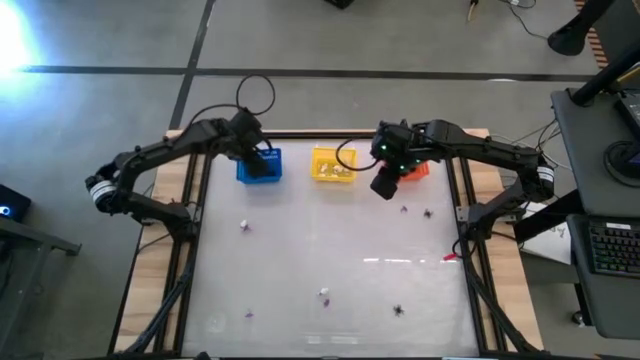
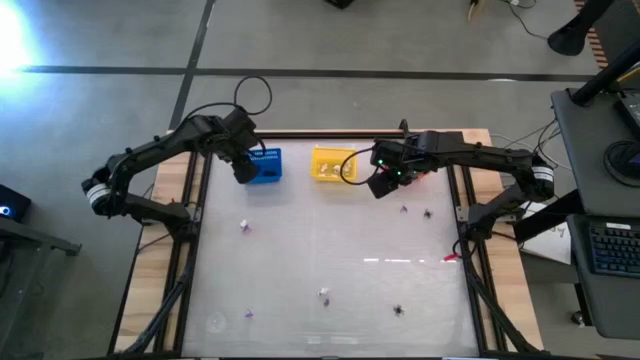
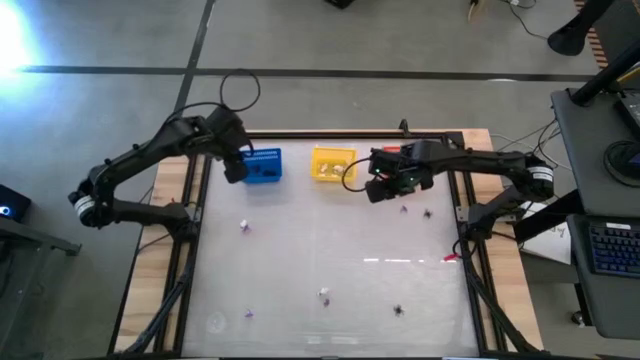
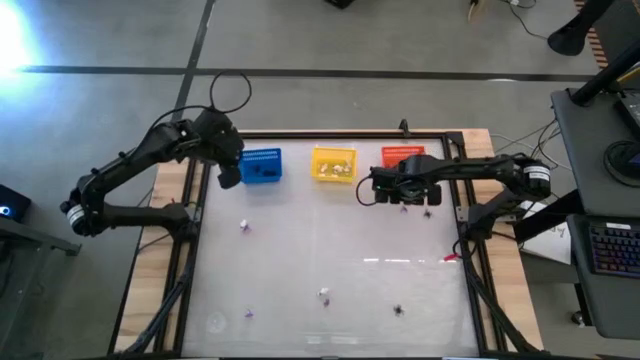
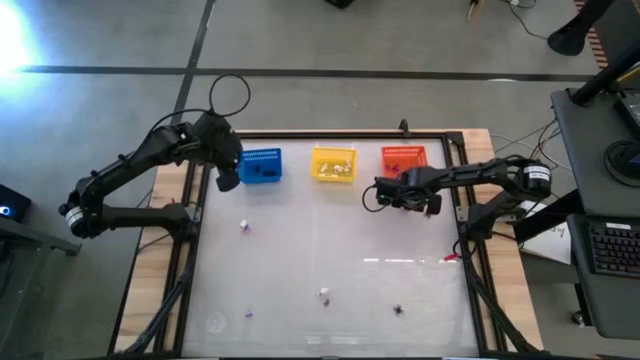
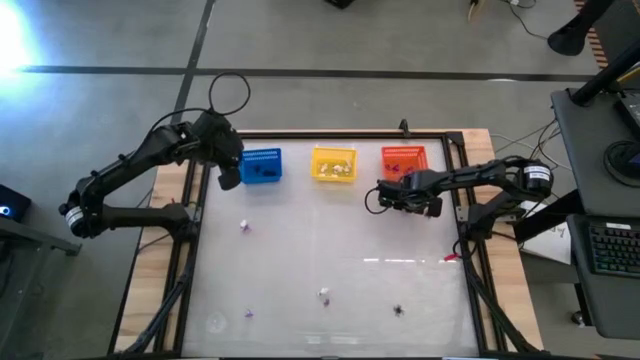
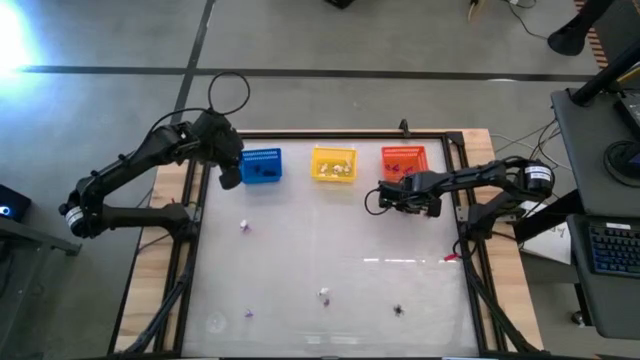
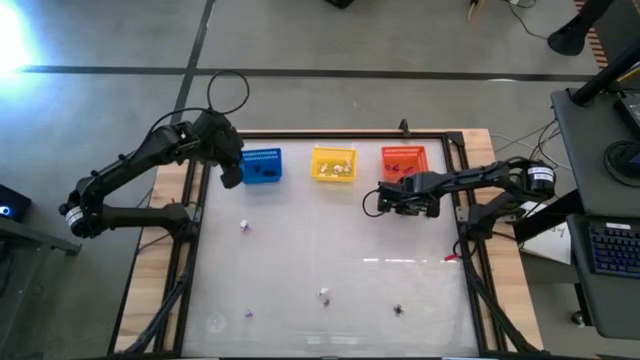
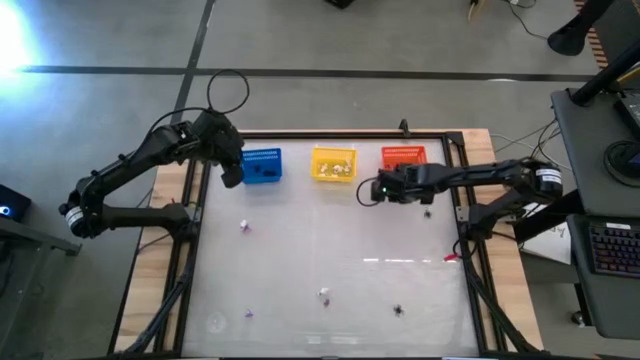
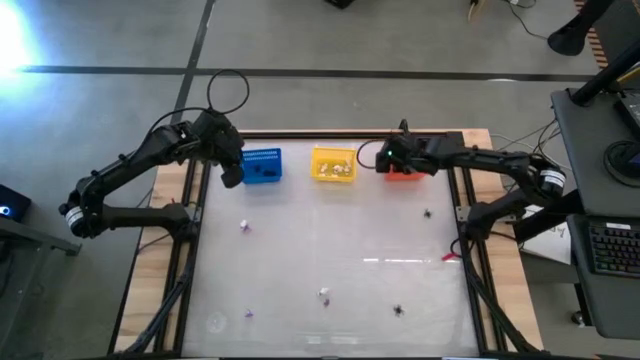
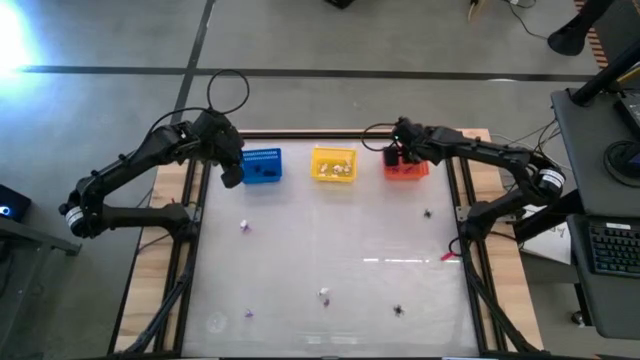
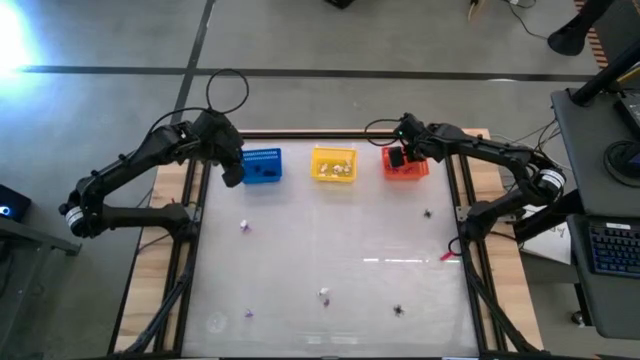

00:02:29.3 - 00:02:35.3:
Task: Sort Halloween decoration
Put the purple hat toy into the orange bin

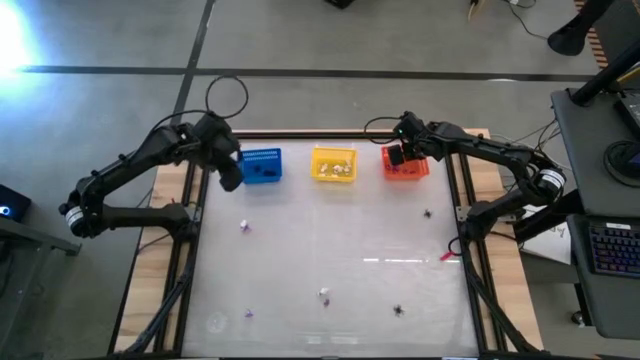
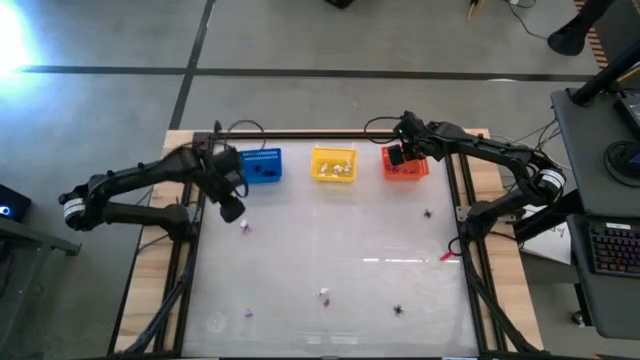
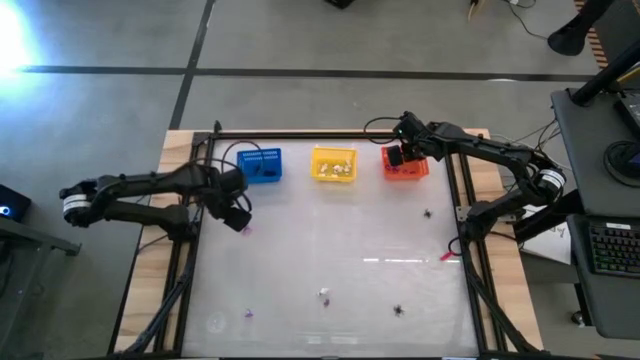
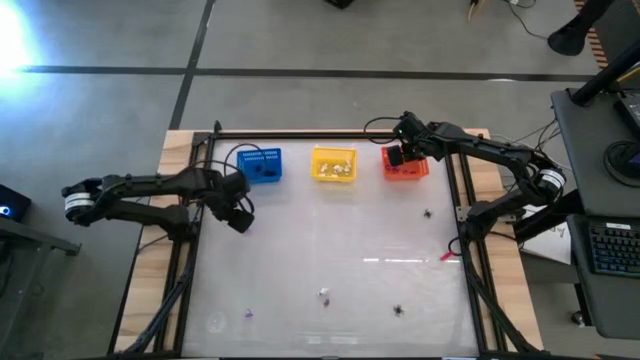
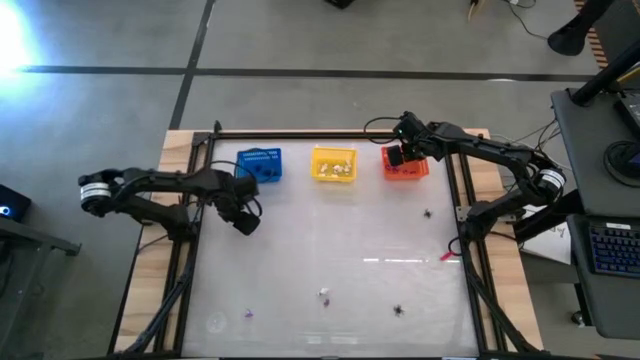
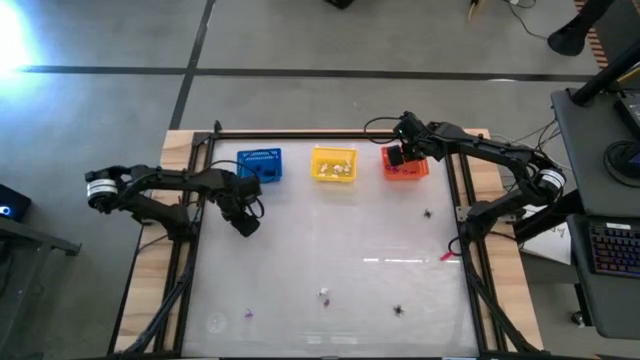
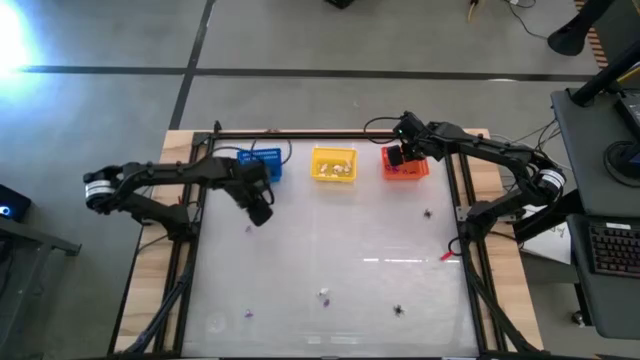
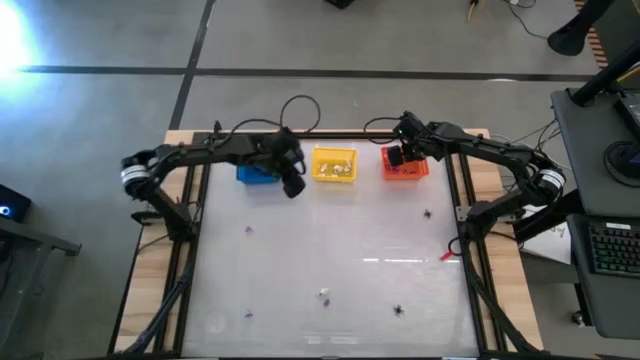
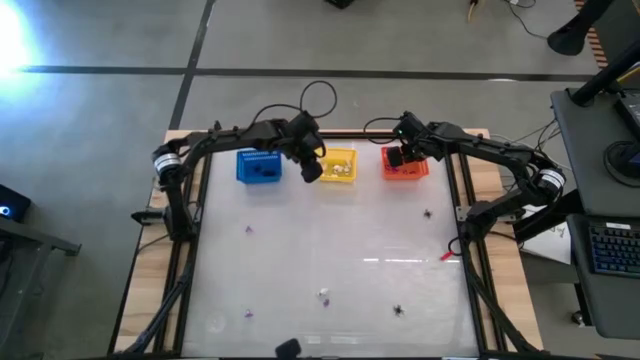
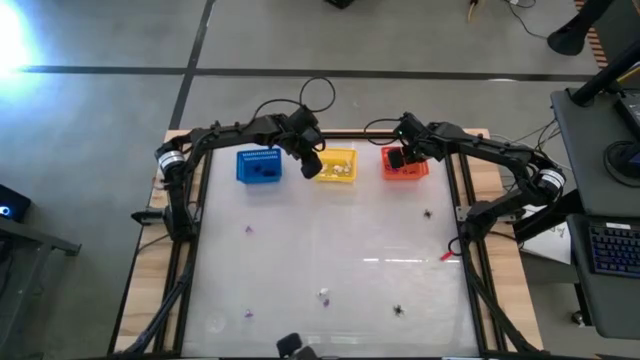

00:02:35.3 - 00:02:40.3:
Put the white skeleton toy into the yellow bin

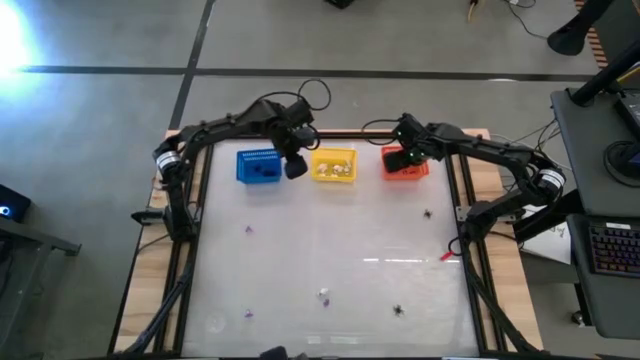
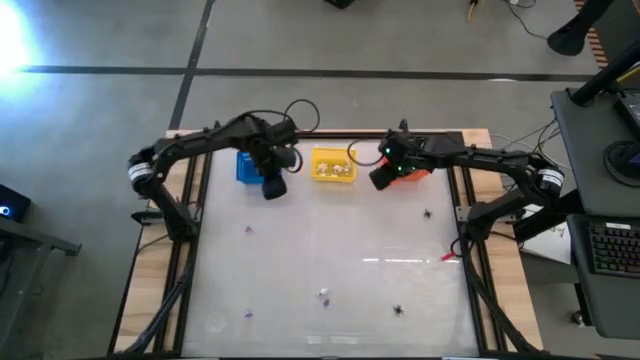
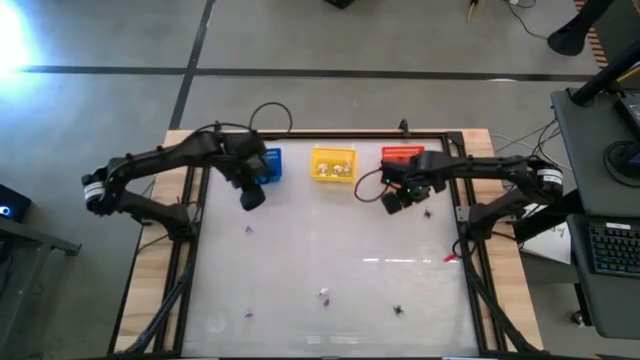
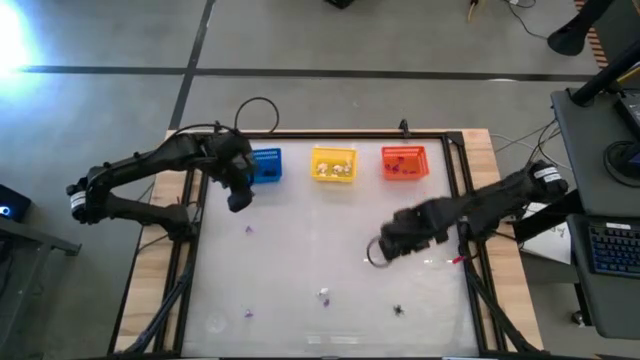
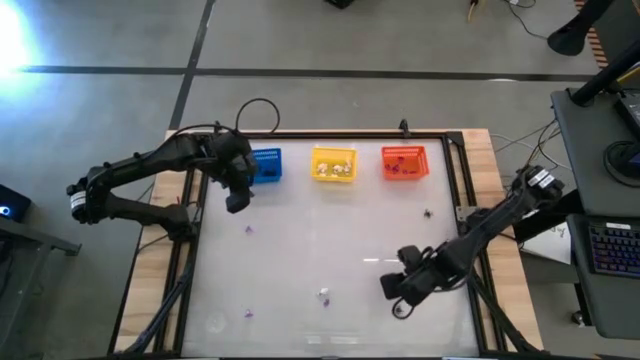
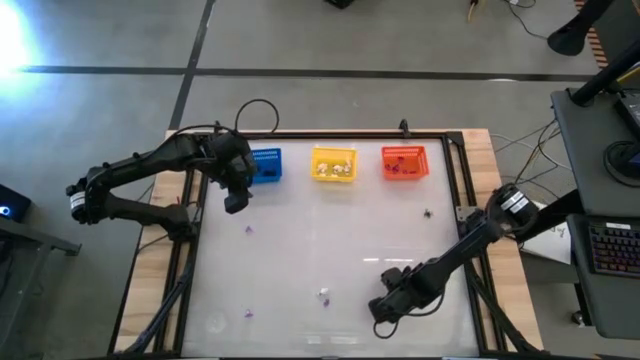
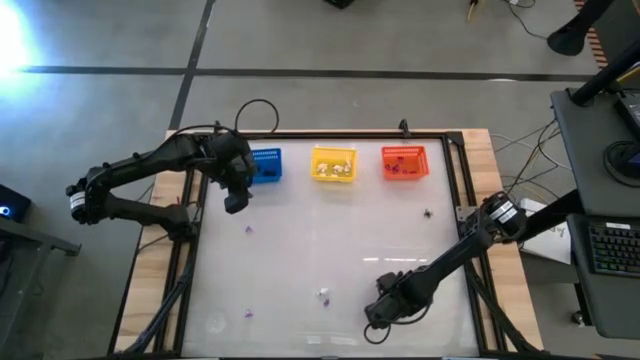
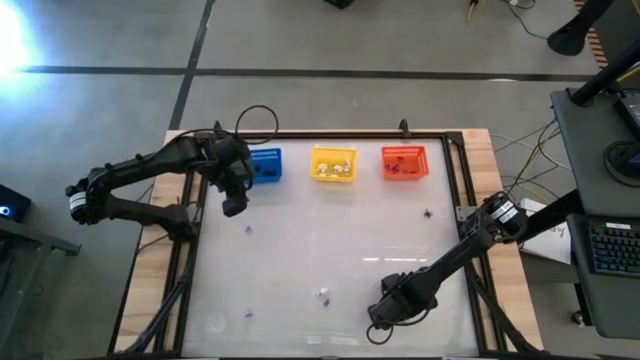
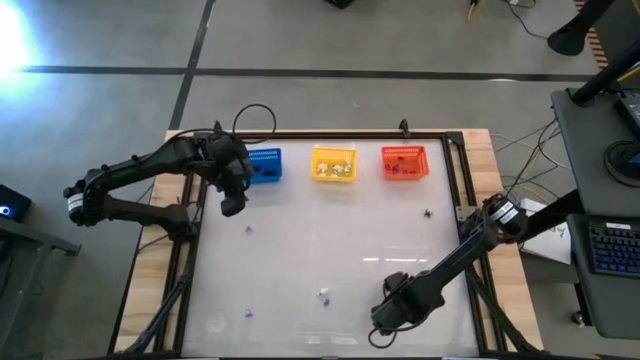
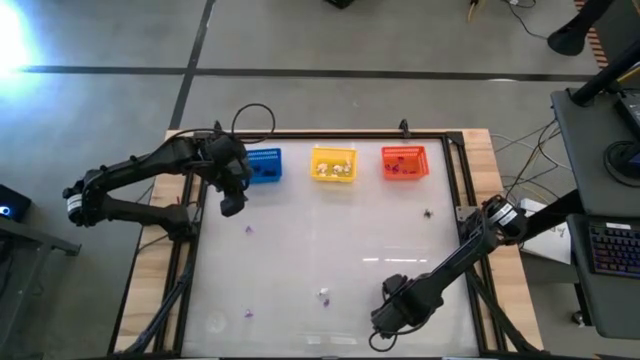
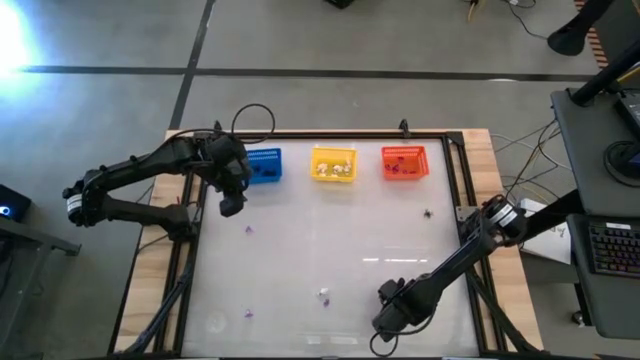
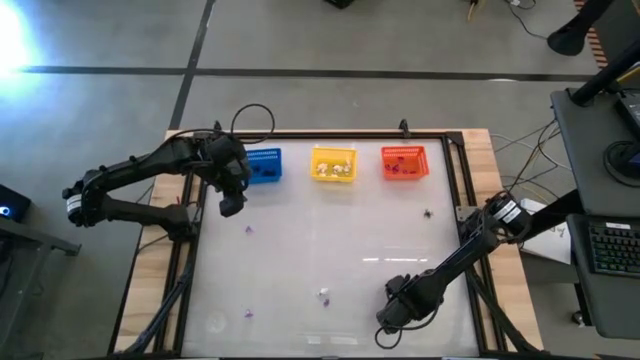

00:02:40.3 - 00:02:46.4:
Put the black spider toy into the blue bin

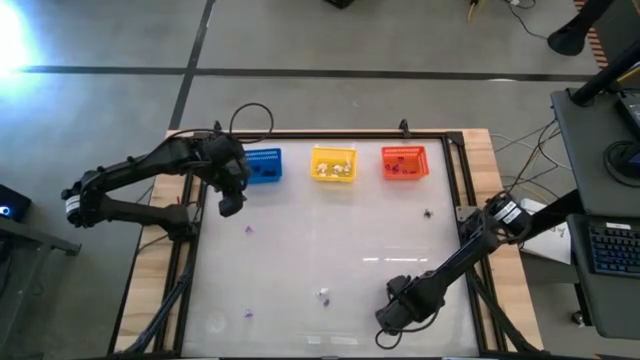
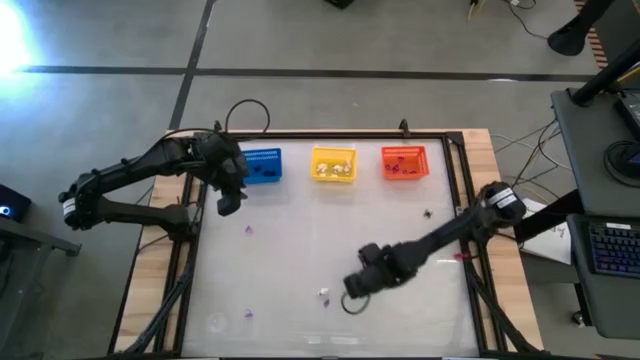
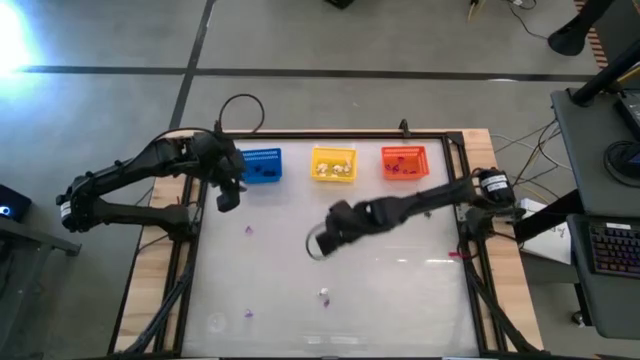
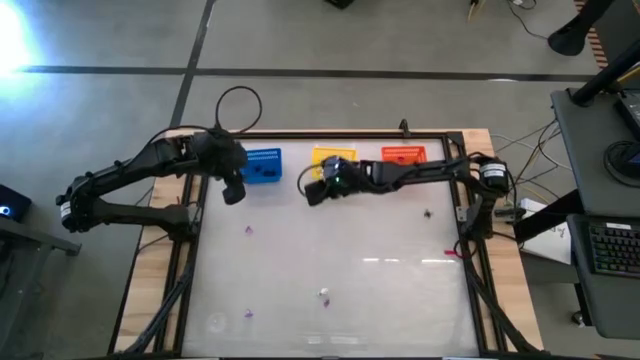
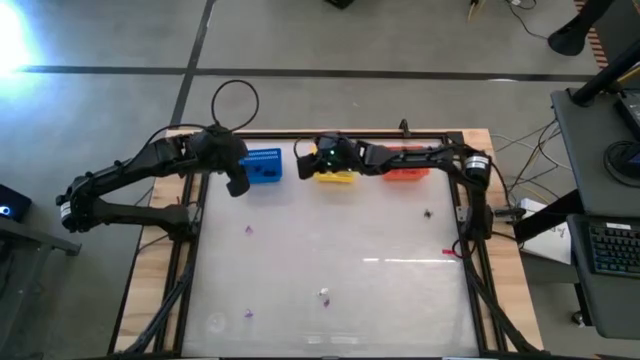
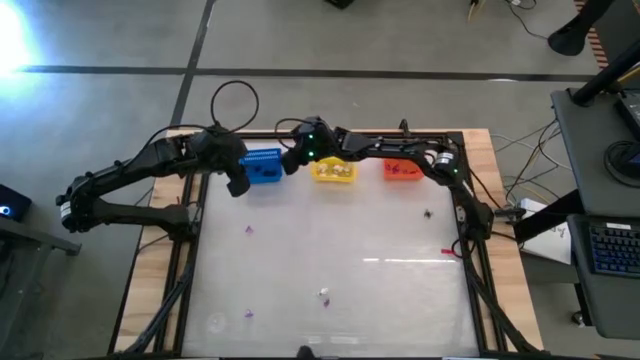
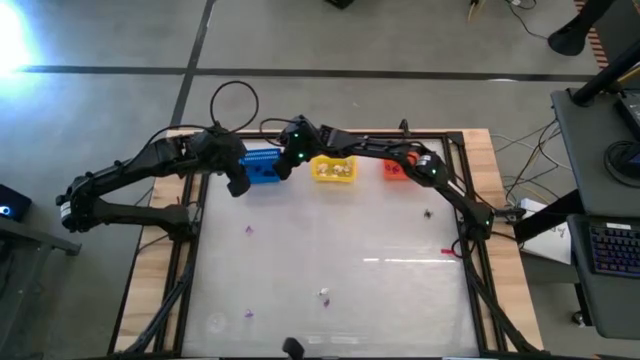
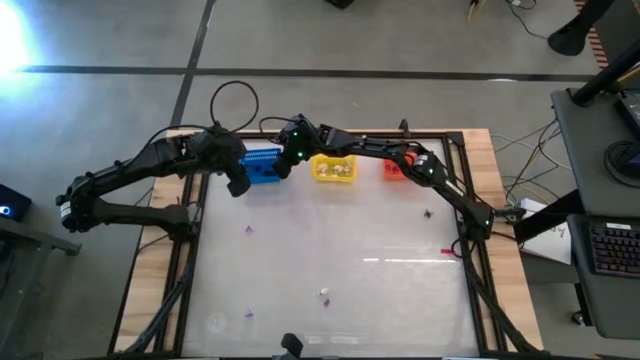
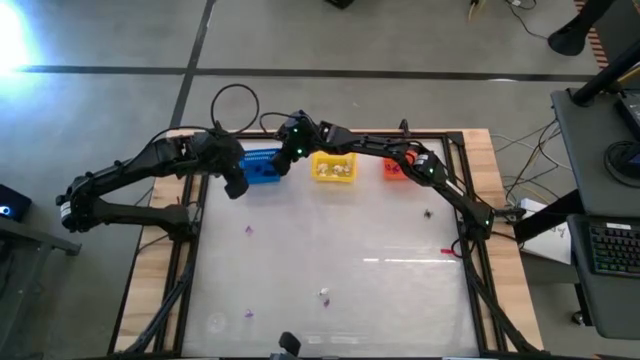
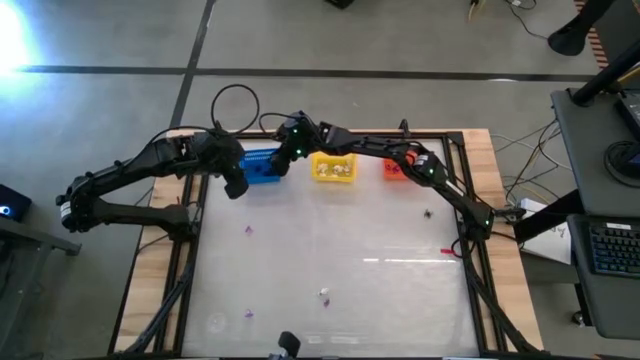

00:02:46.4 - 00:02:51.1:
Put the black spider toy into the blue bin
